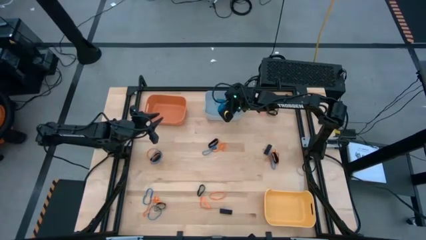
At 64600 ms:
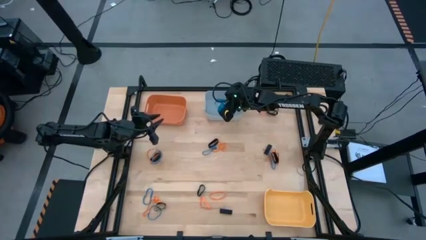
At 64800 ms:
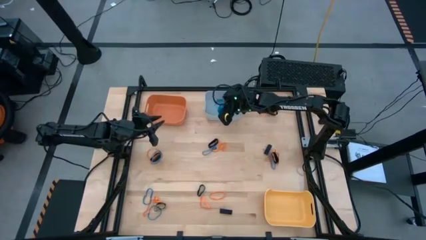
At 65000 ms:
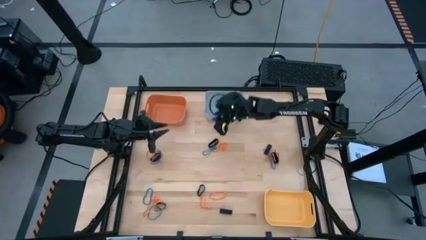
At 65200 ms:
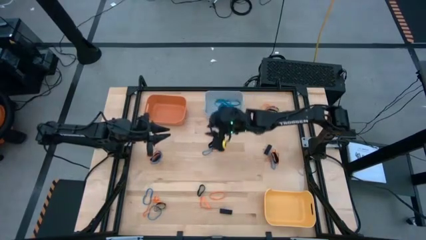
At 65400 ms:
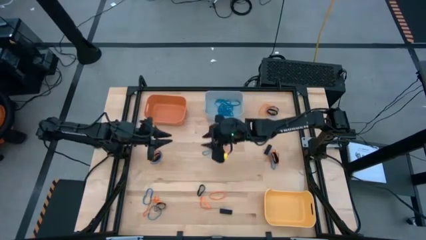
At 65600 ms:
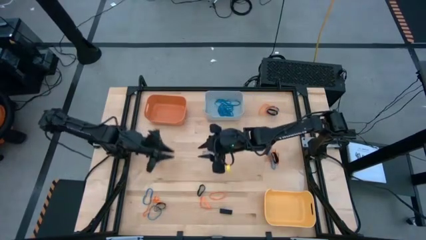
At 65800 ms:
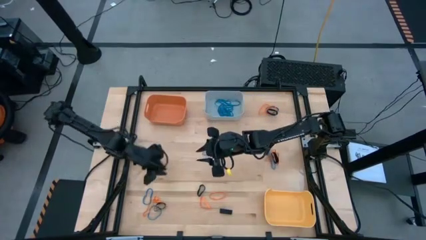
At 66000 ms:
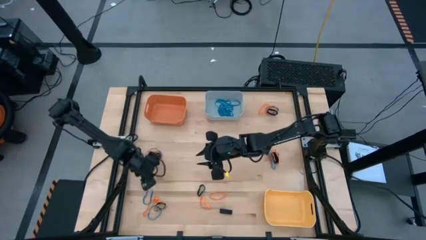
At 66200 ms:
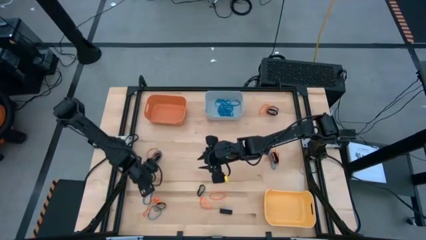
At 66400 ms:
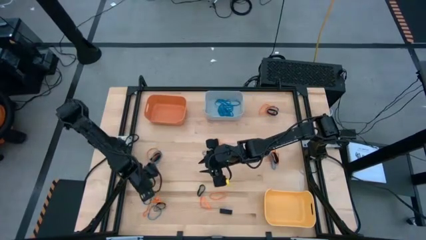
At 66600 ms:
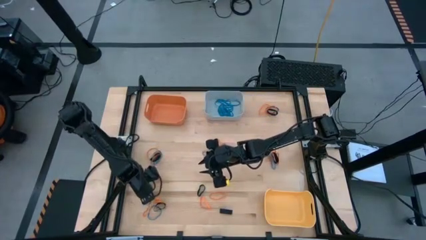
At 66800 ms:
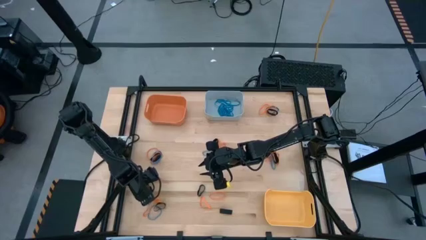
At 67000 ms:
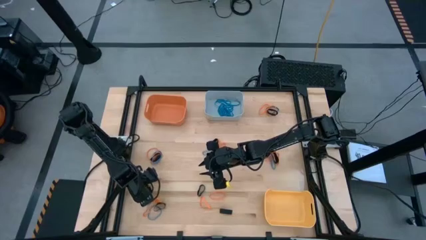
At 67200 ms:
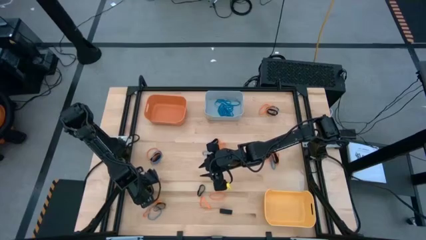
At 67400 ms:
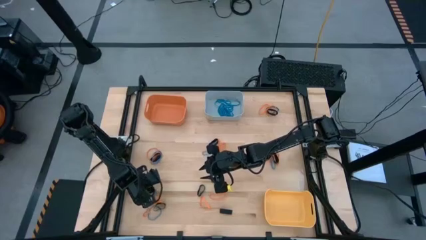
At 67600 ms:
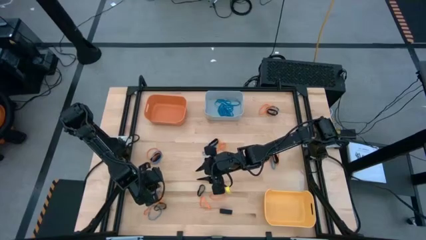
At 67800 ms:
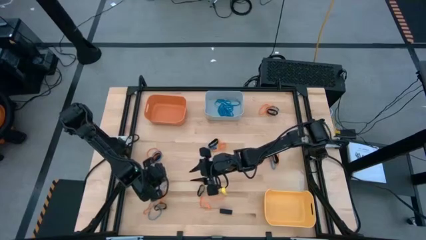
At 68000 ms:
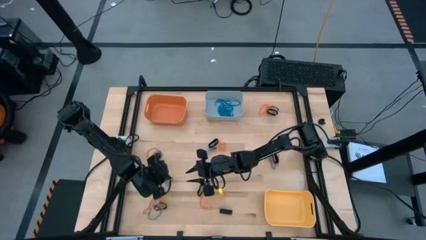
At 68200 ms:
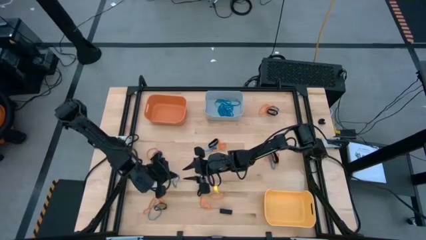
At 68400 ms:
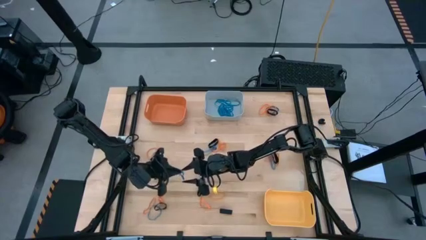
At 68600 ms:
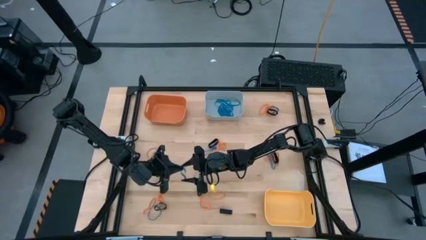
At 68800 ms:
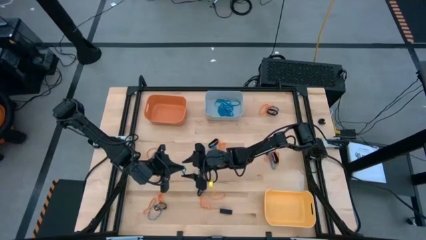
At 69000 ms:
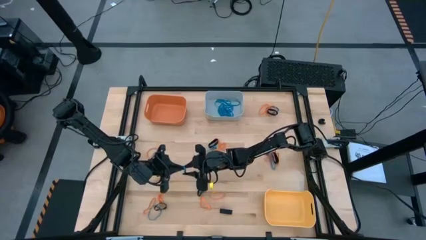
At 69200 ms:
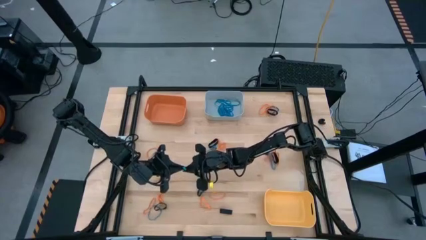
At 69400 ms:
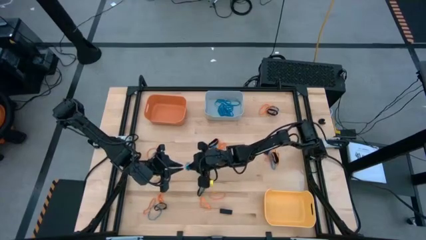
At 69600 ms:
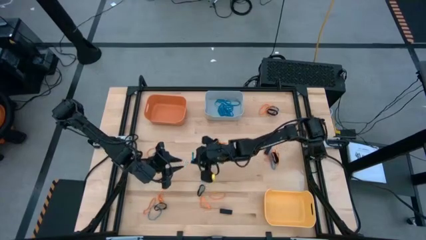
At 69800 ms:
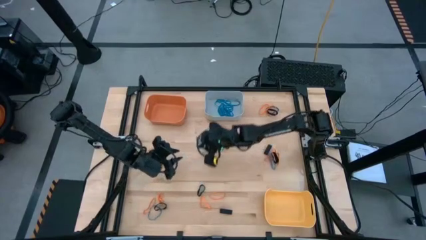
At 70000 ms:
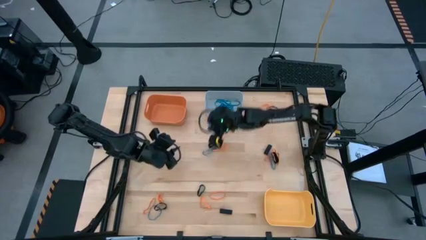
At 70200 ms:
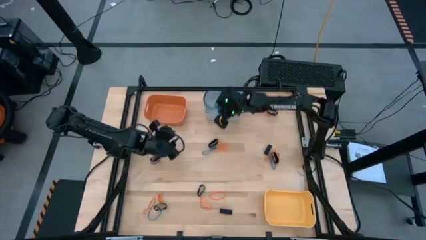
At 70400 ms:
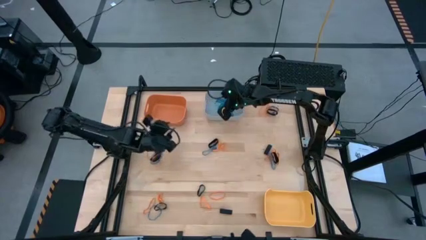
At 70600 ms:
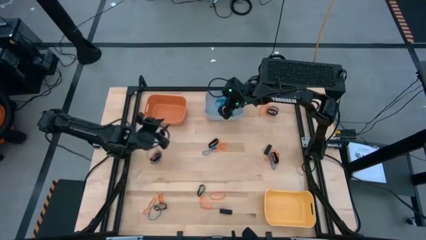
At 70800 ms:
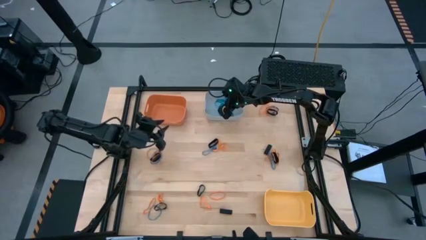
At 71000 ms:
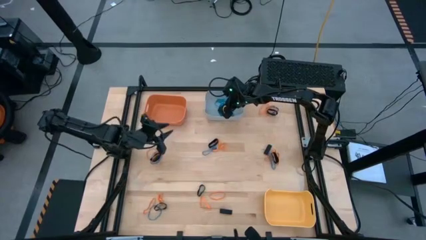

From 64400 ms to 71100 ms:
Task: Sort rubber bands into baskets
Put the blue rubberband into the gray bin

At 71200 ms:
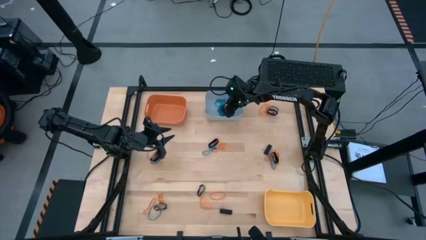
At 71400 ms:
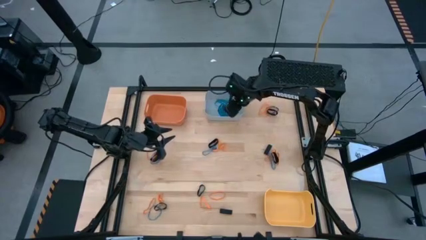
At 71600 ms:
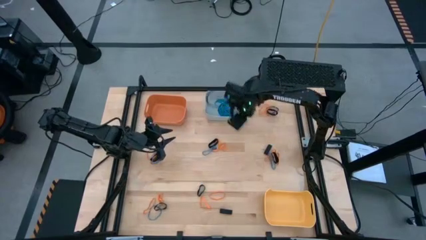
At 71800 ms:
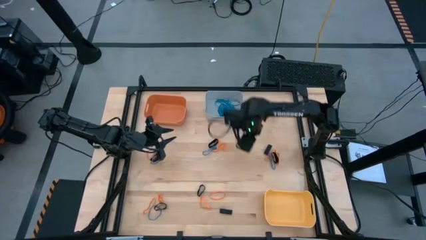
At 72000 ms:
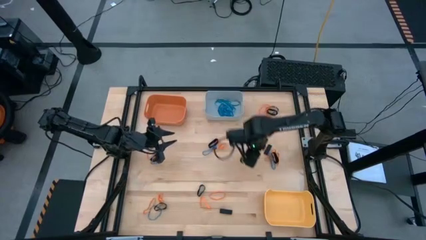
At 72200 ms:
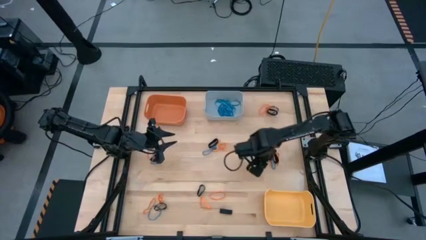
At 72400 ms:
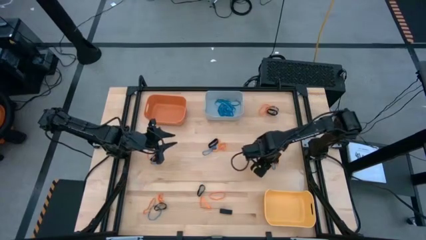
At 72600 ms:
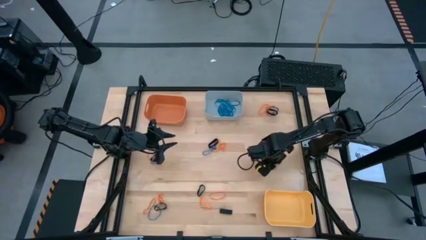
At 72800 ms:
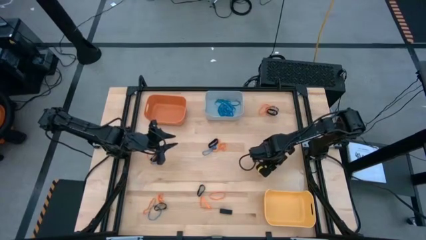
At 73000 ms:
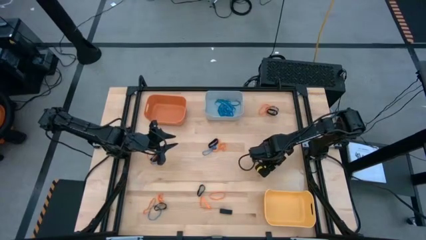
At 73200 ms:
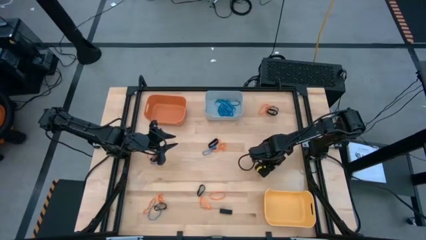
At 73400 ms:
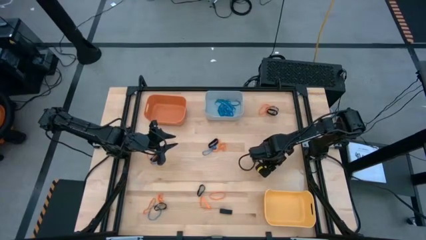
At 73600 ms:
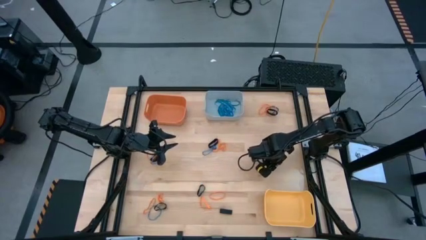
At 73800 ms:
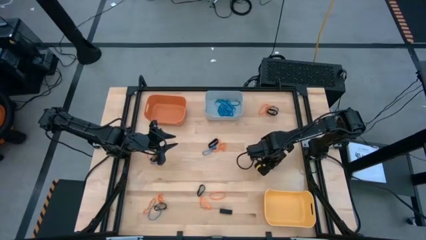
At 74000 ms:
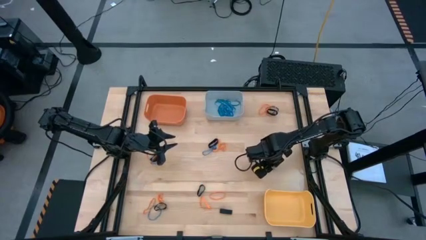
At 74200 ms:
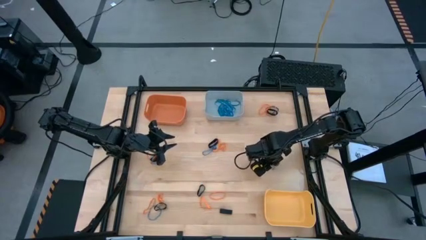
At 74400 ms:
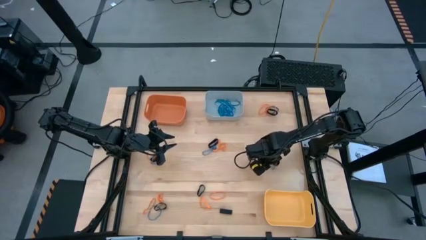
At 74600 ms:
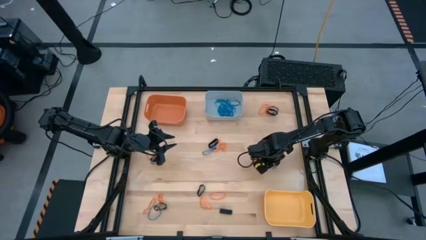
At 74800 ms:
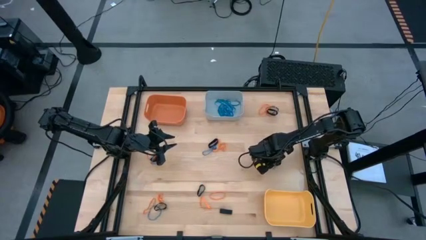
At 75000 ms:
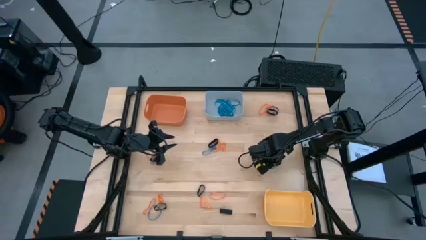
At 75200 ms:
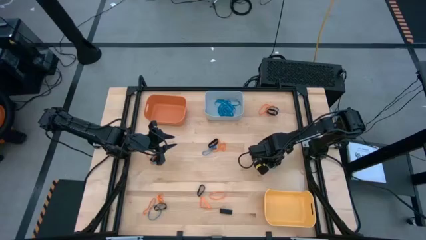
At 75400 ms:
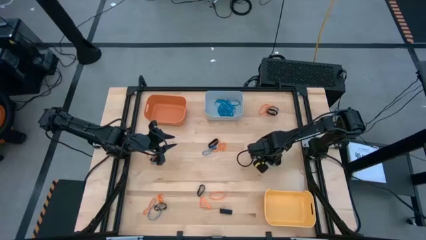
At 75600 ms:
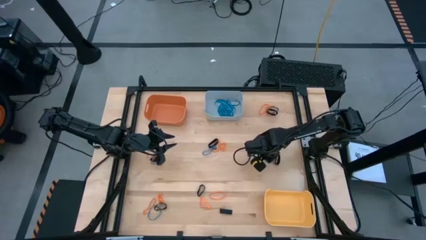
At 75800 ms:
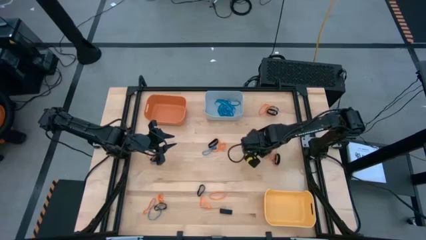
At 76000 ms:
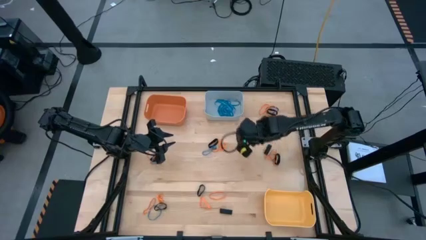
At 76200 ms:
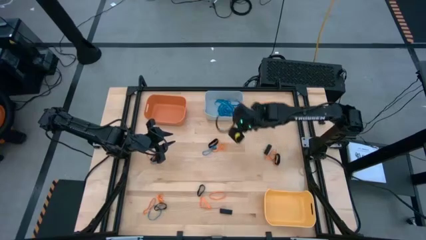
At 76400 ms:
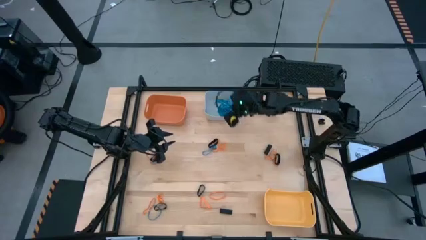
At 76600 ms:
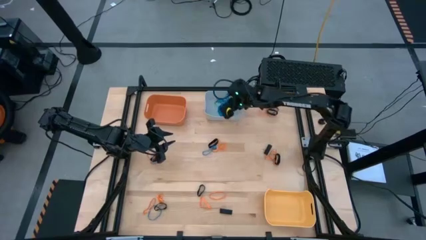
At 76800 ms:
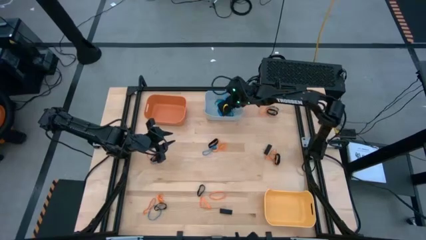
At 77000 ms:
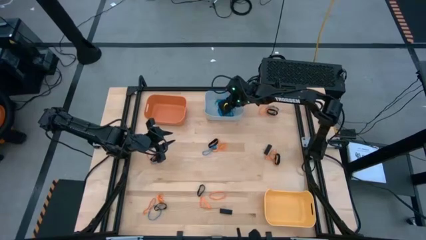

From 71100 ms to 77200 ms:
Put the blue rubberband into the gray bin

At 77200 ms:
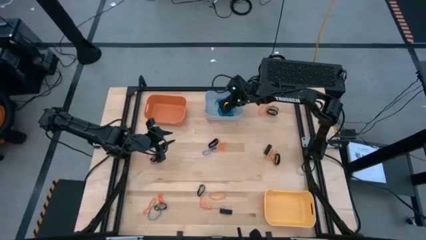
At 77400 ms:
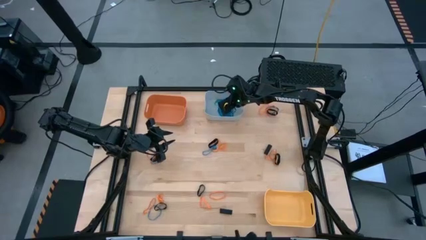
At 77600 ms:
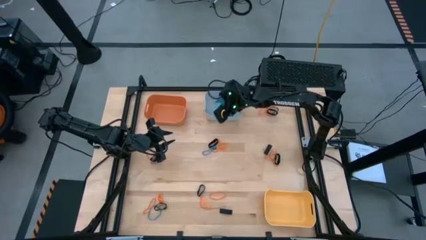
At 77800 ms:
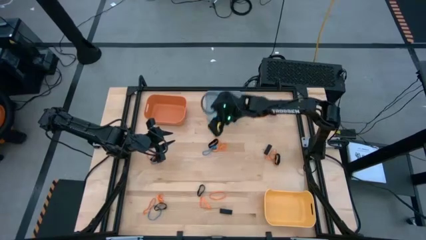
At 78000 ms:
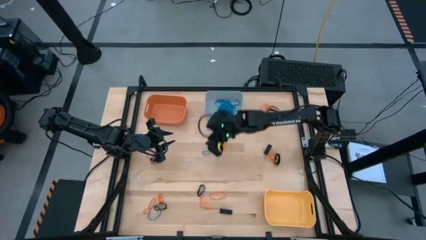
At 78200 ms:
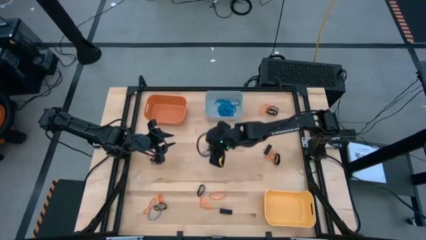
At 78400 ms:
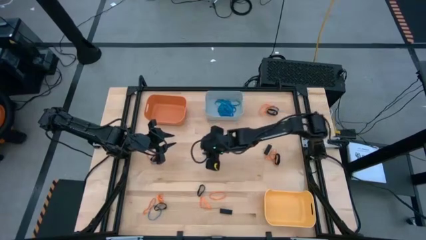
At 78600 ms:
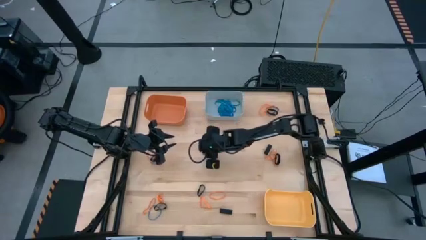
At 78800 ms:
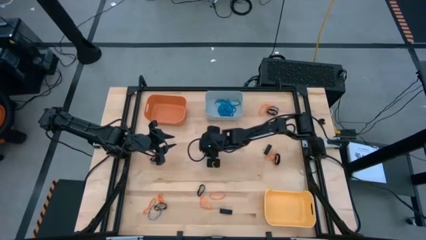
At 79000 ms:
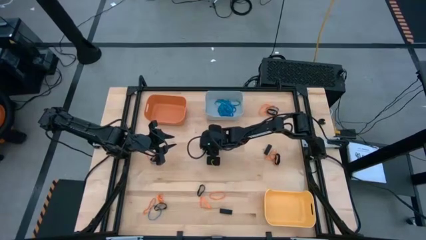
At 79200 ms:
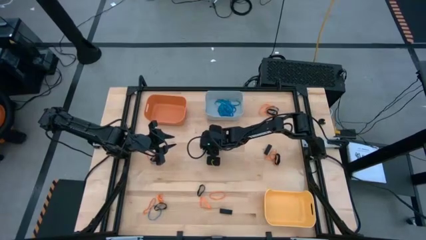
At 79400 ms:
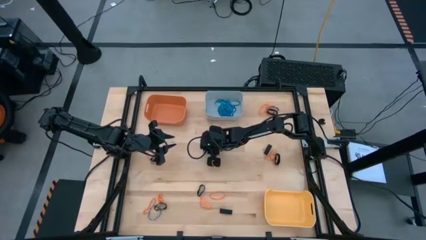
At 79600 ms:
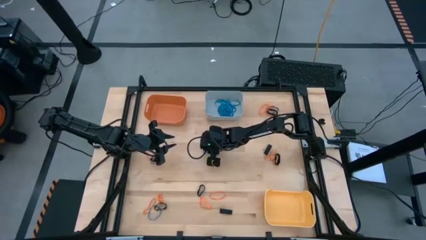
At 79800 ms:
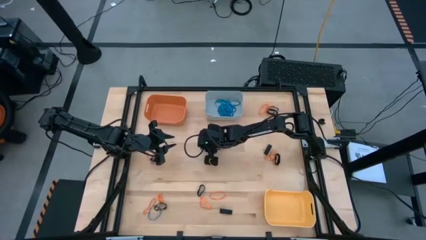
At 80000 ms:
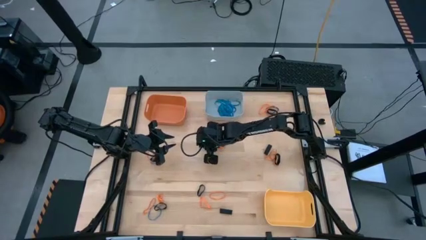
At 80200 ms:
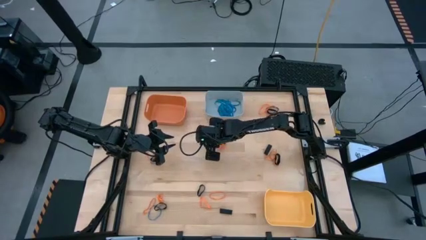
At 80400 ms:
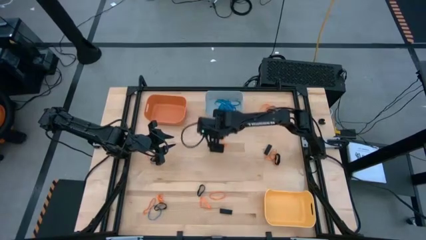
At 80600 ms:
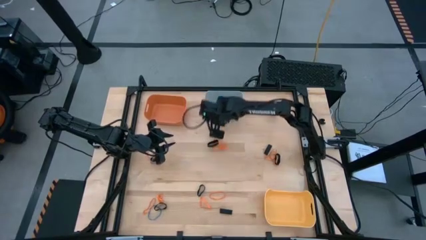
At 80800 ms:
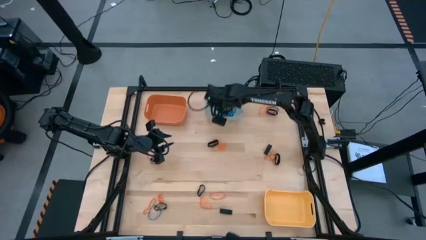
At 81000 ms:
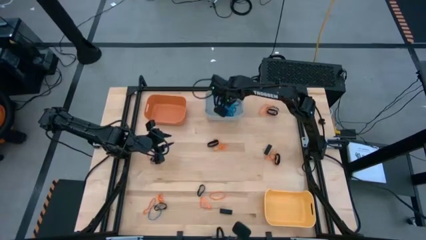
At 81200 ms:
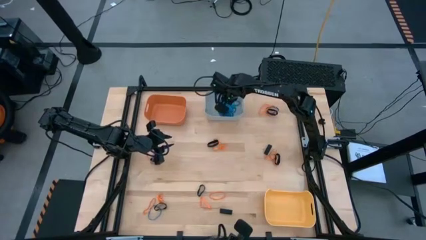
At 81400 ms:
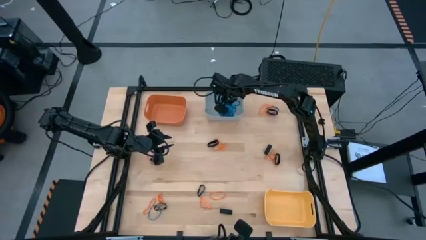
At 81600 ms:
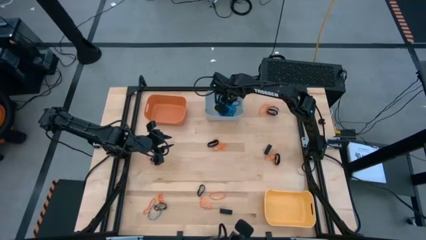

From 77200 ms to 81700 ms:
Put the blue rubberband into the gray bin
